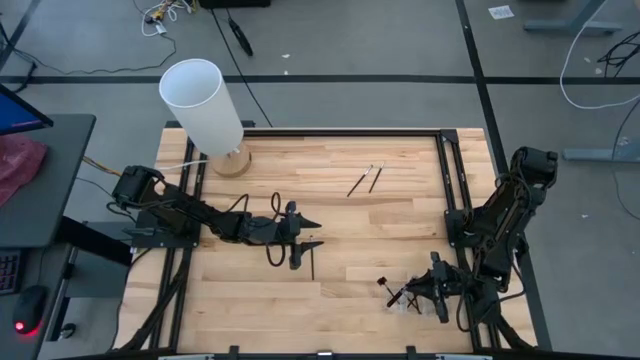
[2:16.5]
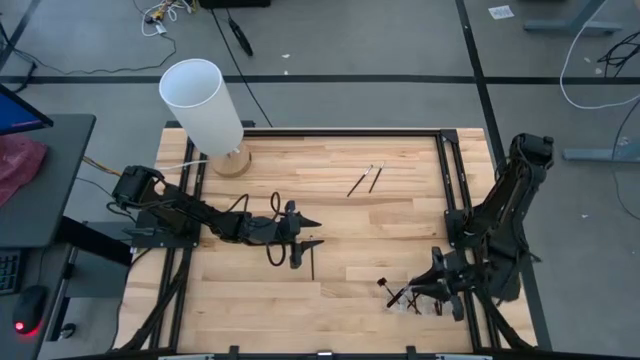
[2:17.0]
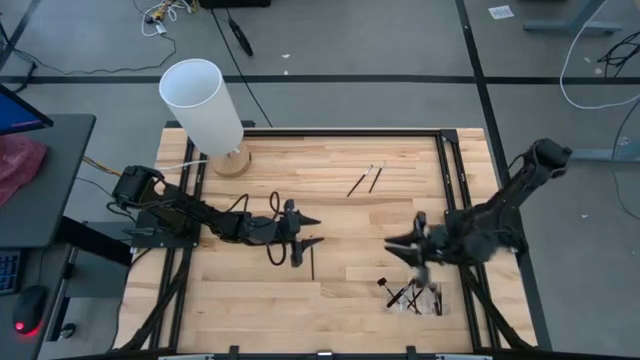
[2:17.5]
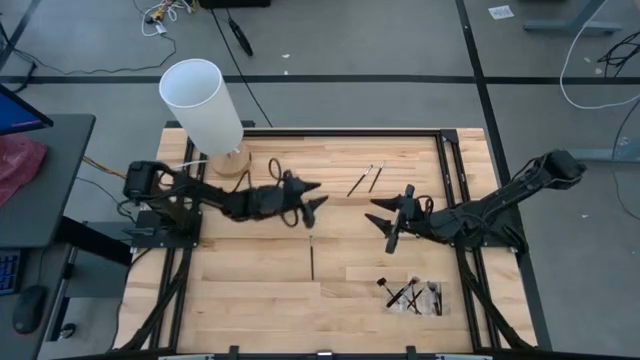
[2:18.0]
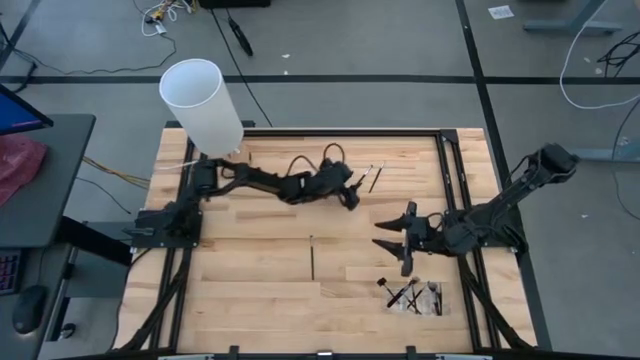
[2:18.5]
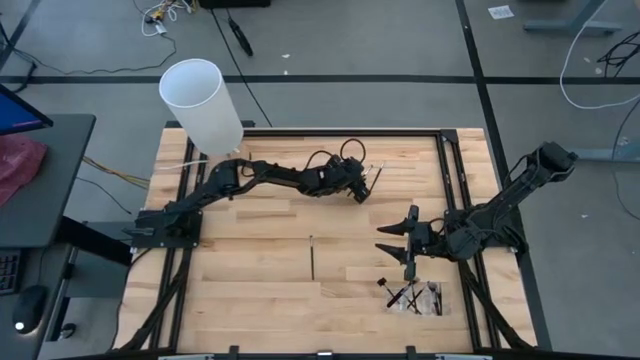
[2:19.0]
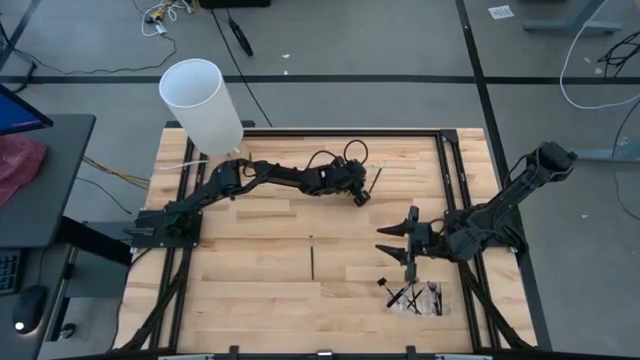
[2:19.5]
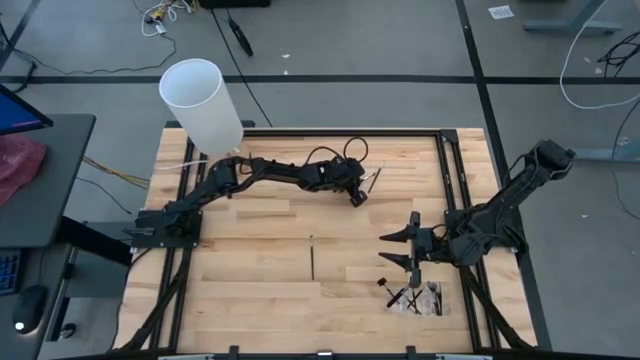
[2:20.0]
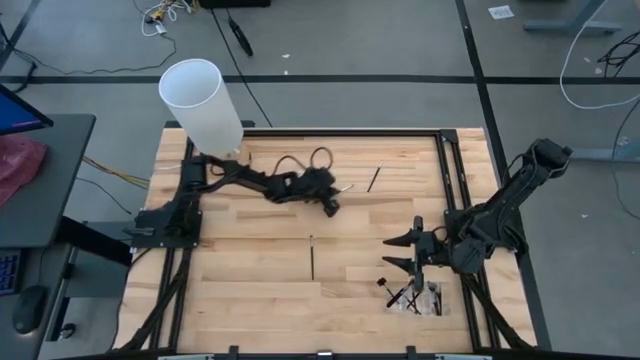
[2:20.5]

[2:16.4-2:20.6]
Task: Pick & Place Makeup Supplies
Put the silver makeup brush into the transparent organizer

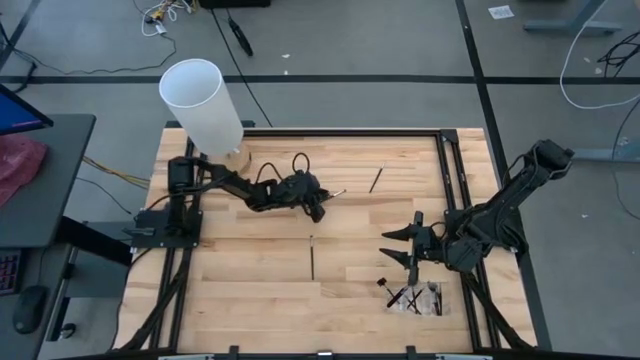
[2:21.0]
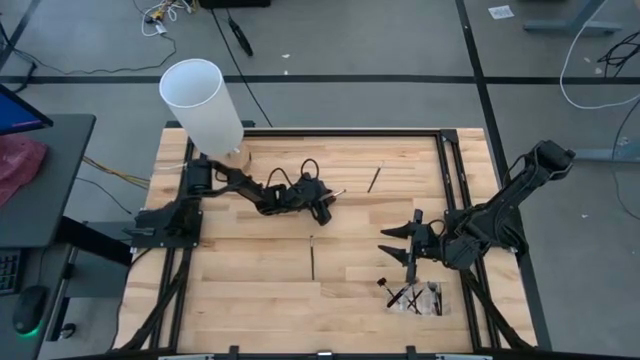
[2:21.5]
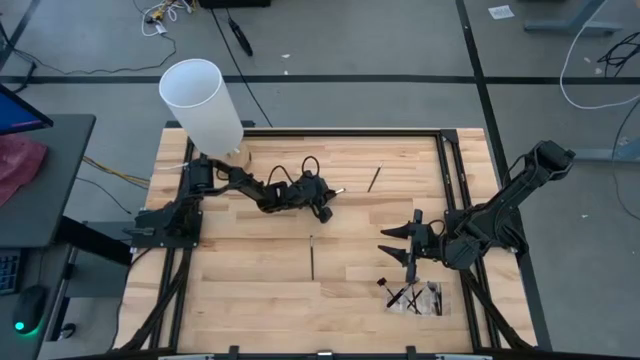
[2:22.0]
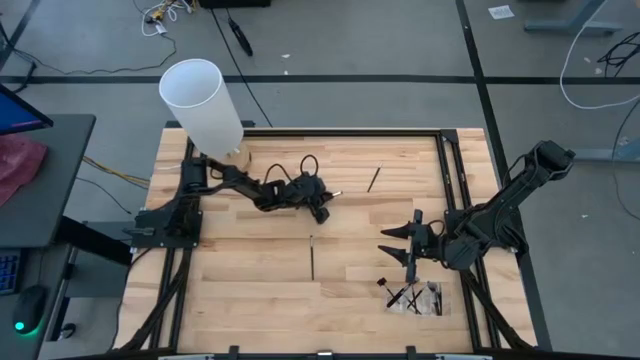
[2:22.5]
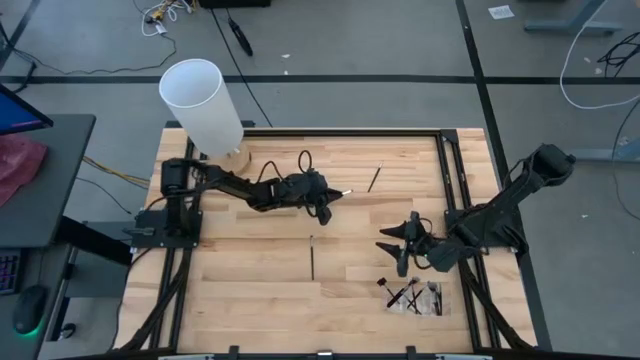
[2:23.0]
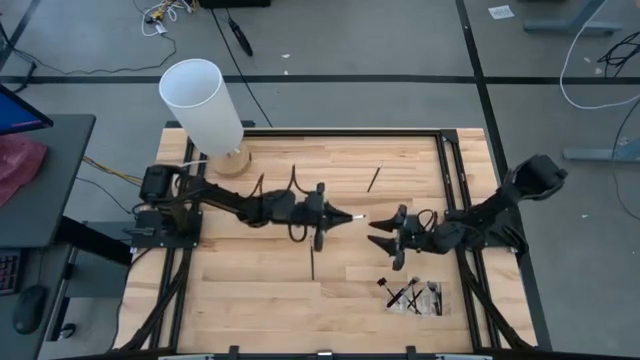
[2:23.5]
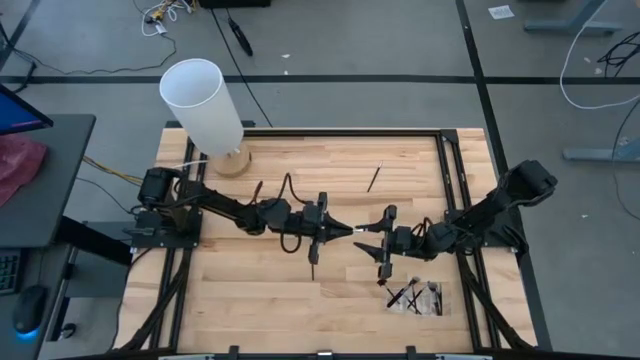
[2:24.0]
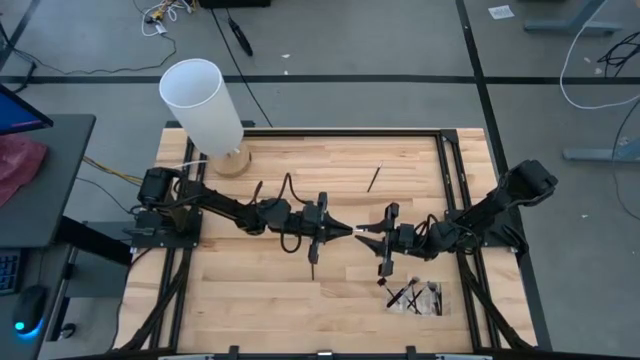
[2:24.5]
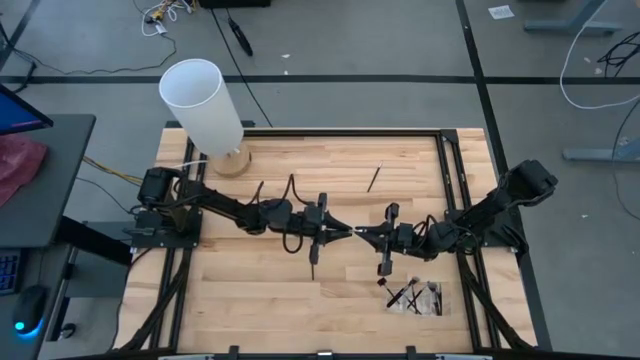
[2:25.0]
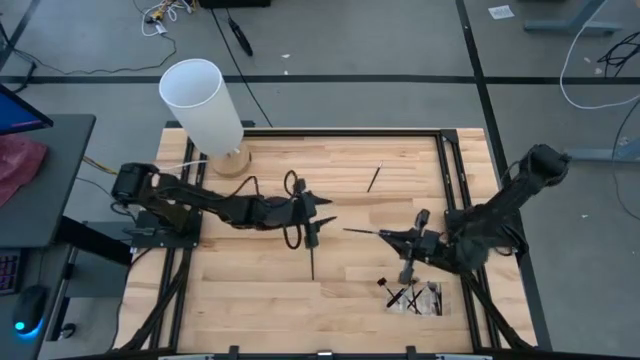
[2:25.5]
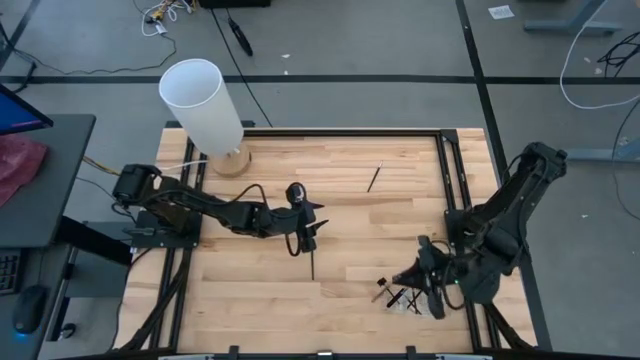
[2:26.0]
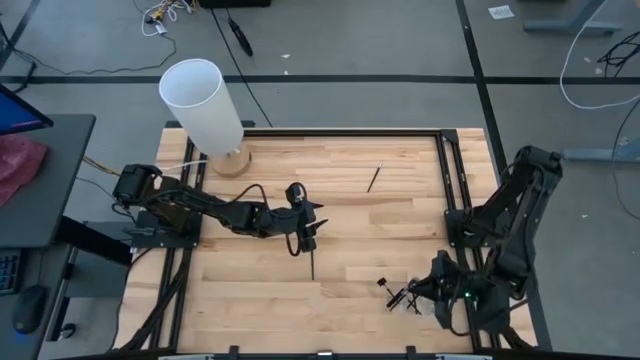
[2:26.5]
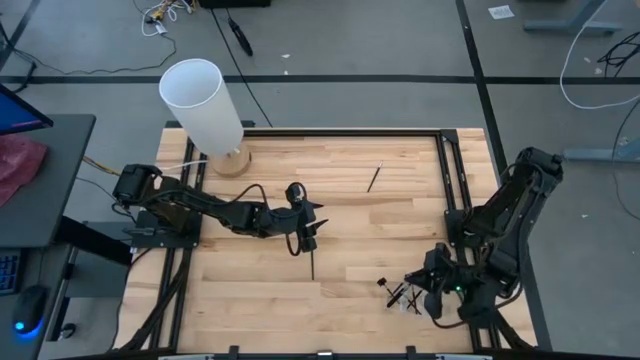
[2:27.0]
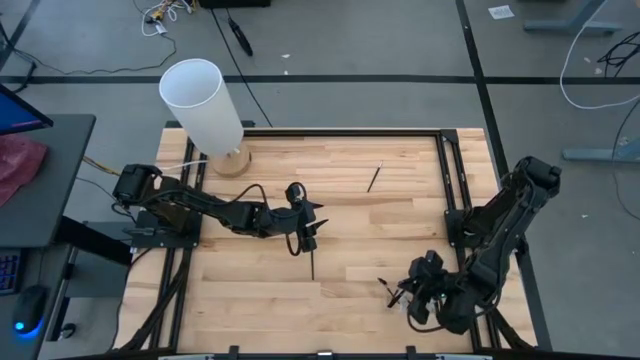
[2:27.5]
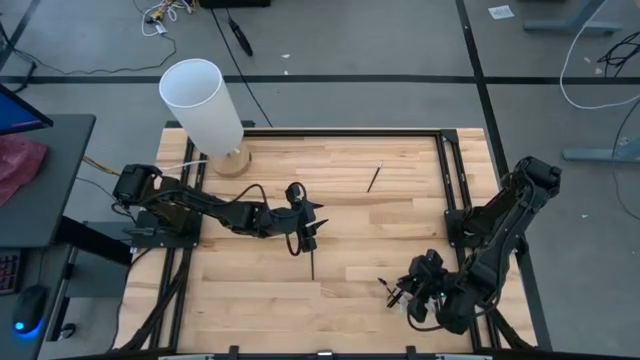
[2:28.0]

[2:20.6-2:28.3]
Put the silver makeup brush into the transparent organizer

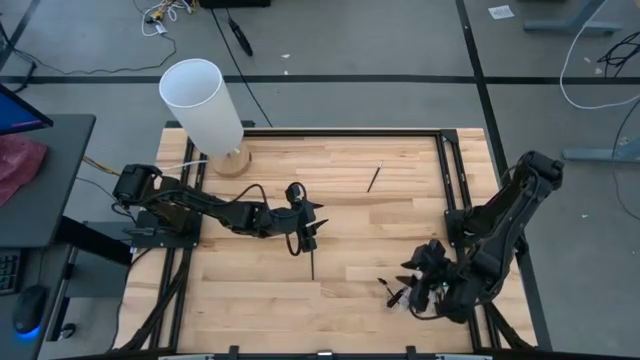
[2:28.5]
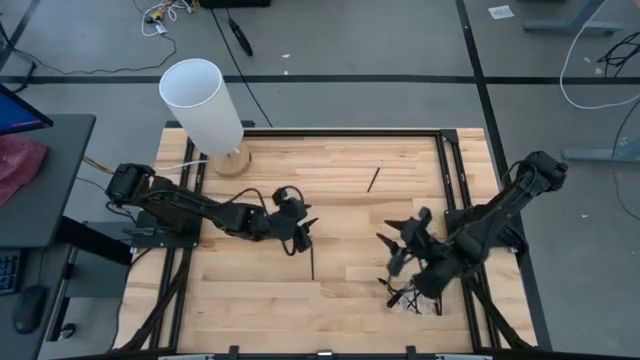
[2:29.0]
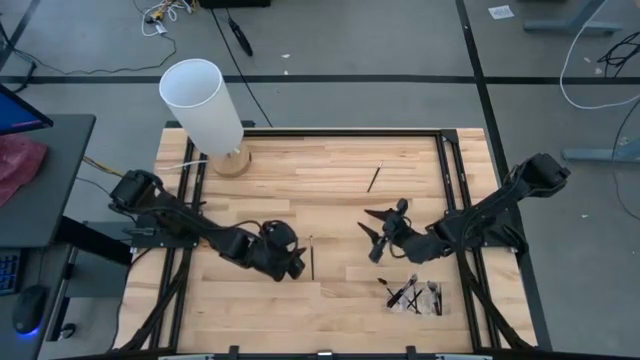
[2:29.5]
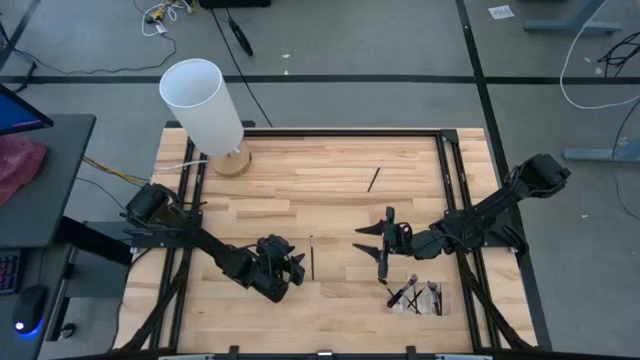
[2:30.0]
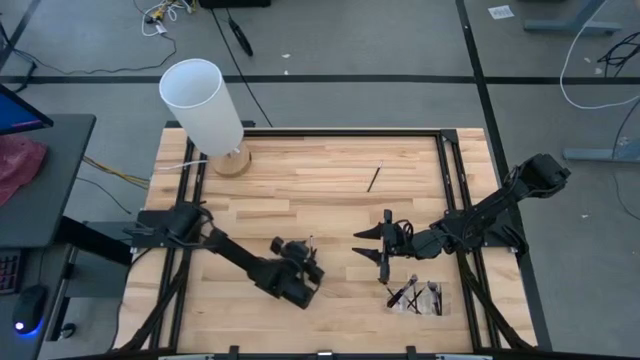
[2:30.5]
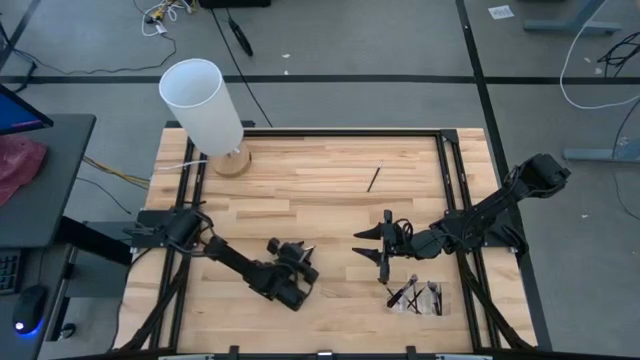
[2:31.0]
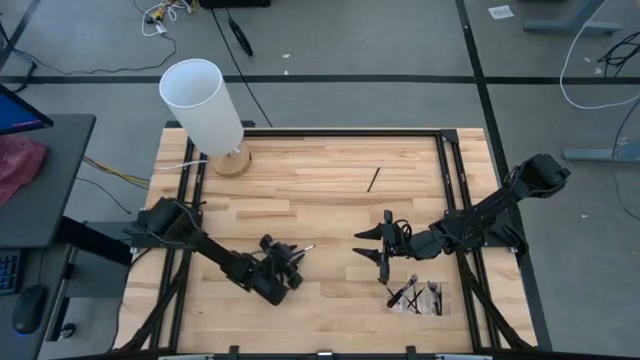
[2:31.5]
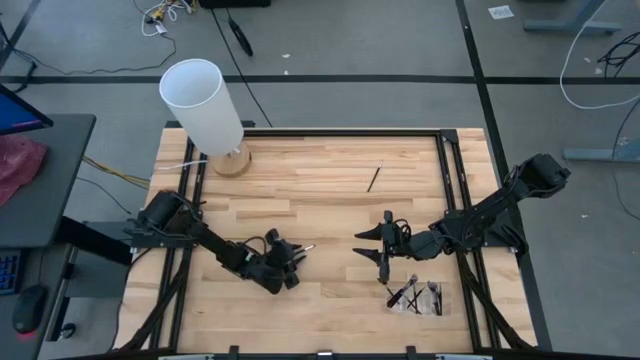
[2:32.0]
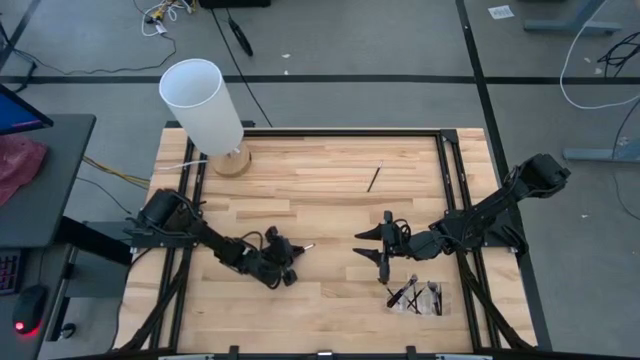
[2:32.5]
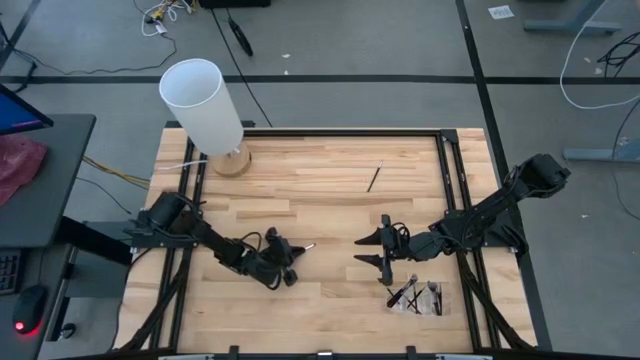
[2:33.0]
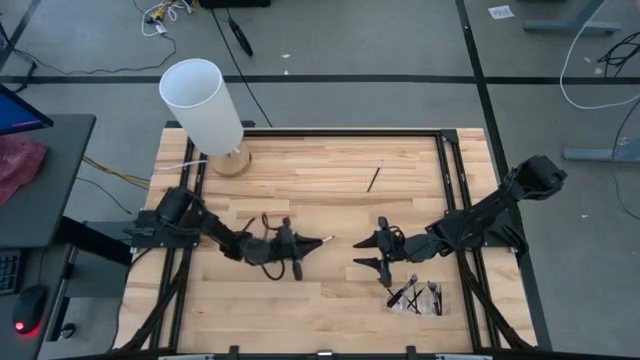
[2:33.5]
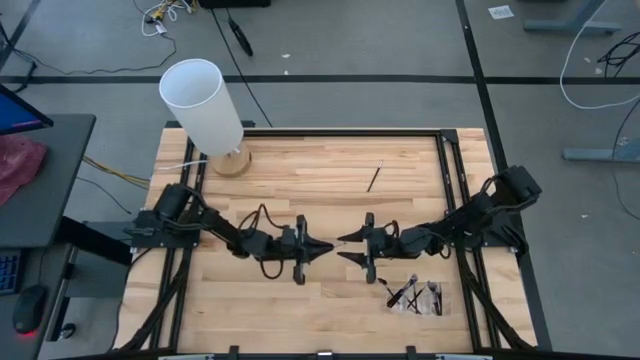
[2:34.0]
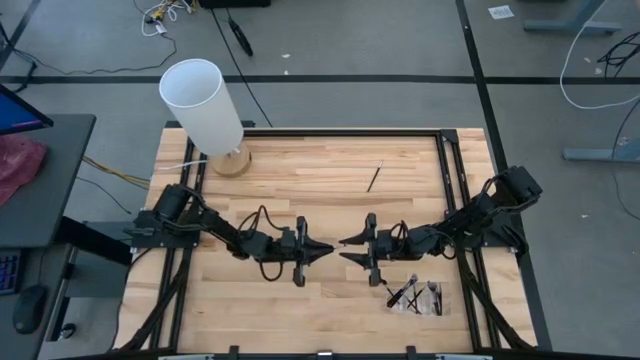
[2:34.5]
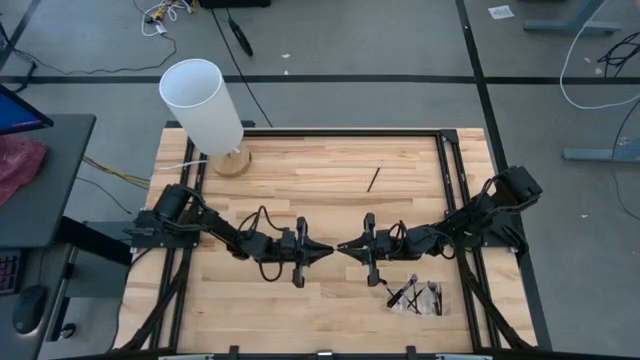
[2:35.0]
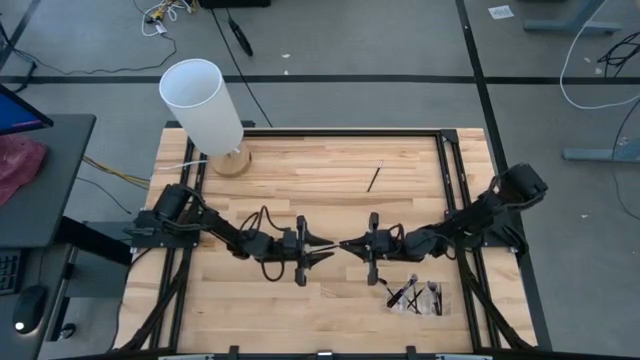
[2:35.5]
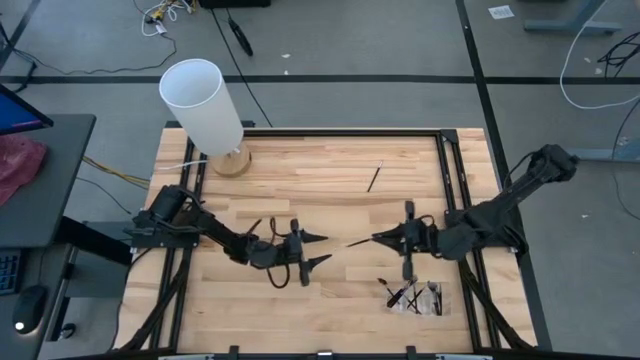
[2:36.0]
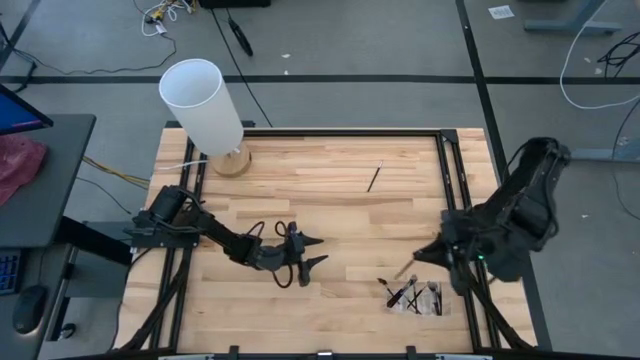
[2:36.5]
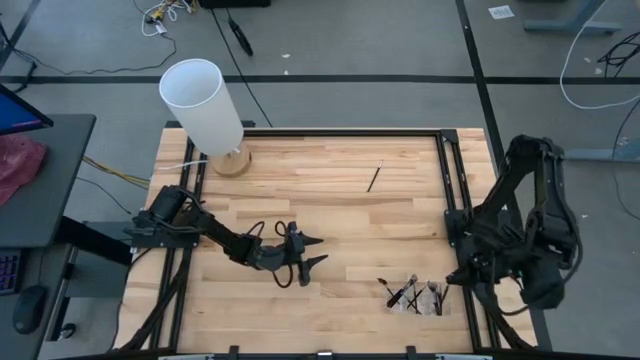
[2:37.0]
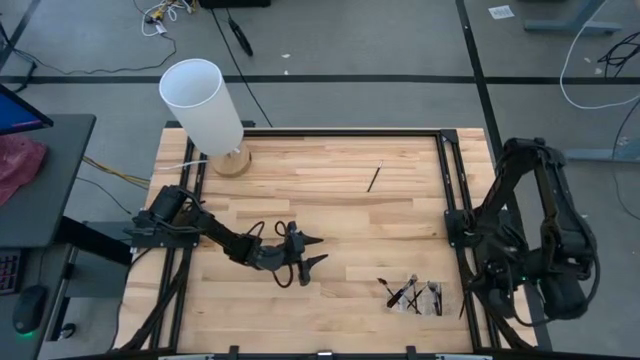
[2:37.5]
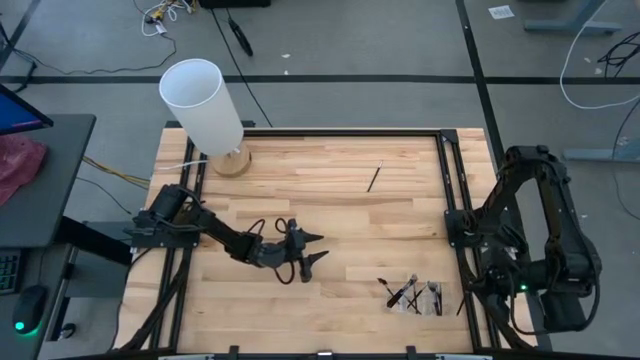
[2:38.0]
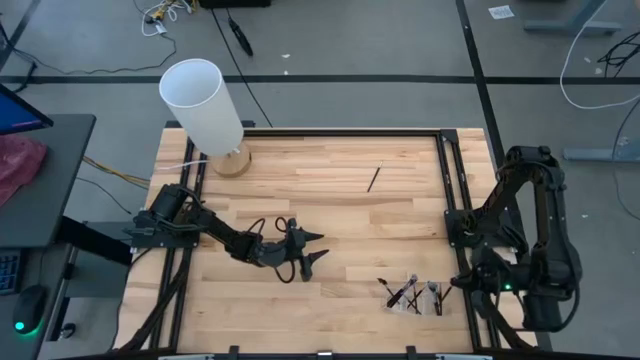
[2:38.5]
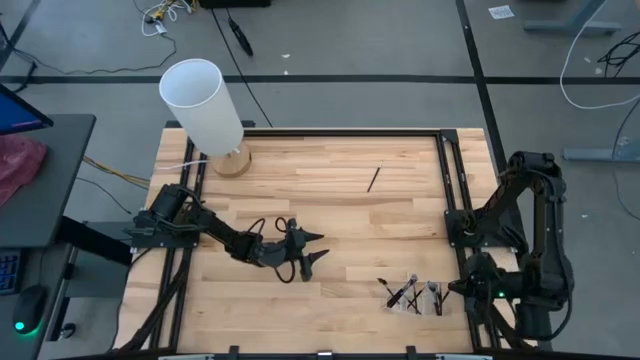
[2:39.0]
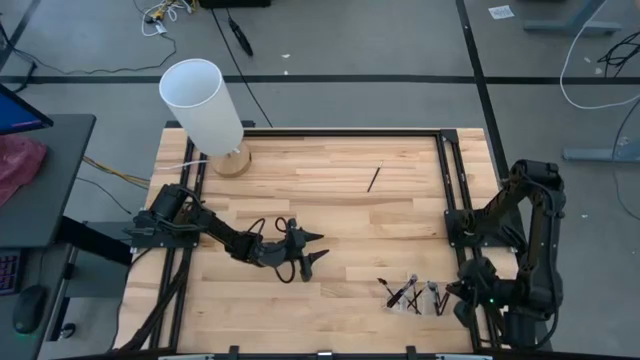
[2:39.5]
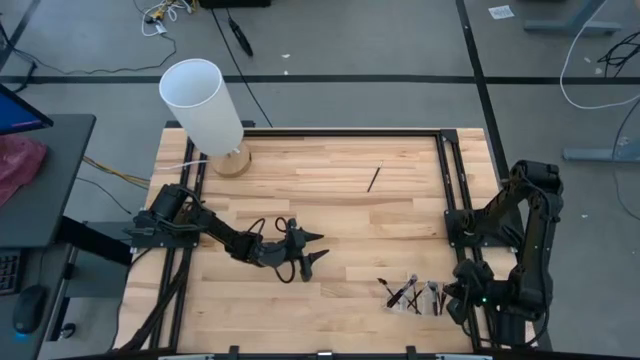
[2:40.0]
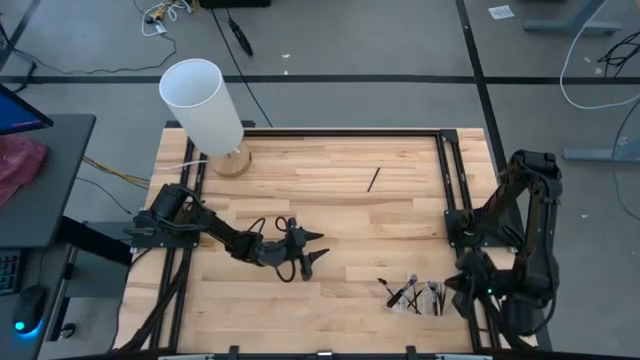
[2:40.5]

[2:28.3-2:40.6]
Put the silver makeup brush into the transparent organizer
